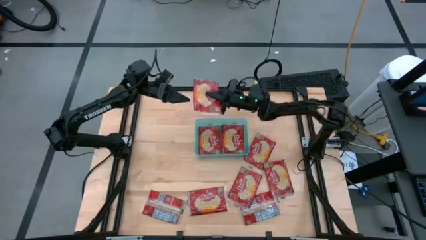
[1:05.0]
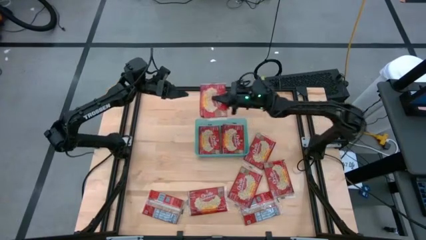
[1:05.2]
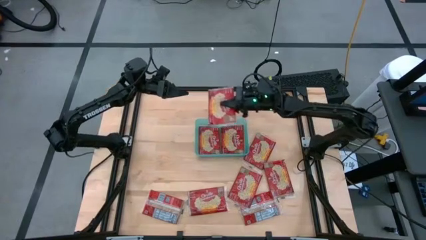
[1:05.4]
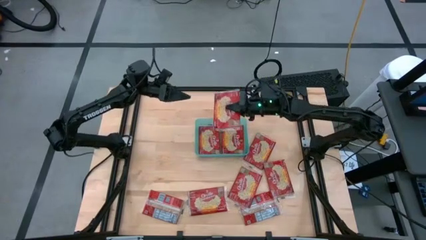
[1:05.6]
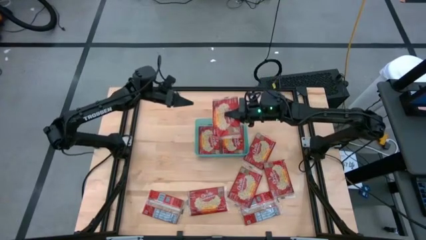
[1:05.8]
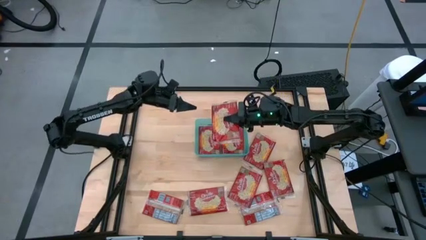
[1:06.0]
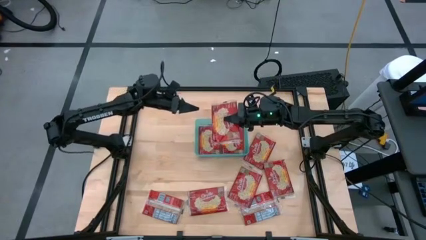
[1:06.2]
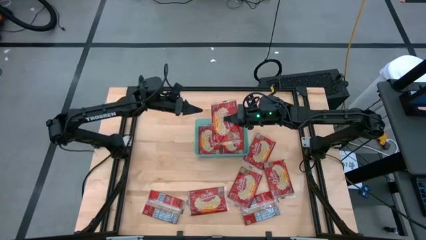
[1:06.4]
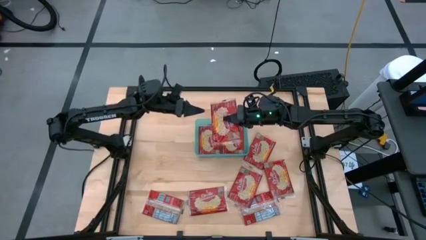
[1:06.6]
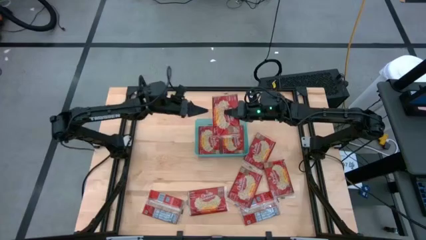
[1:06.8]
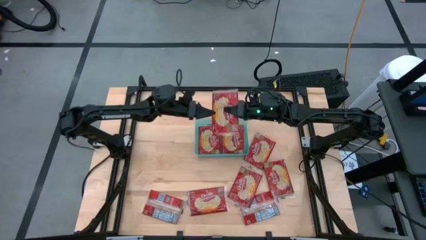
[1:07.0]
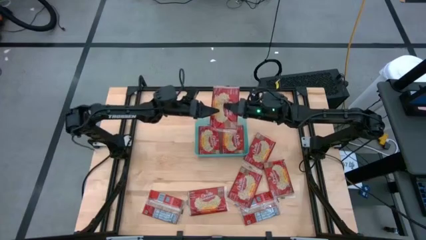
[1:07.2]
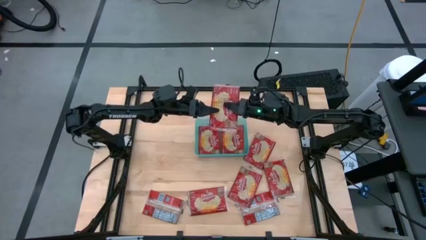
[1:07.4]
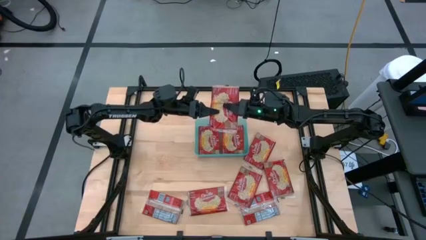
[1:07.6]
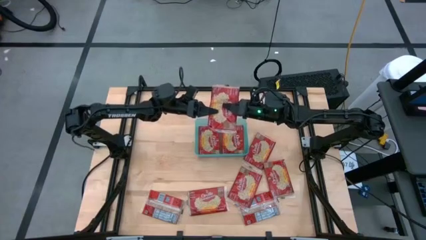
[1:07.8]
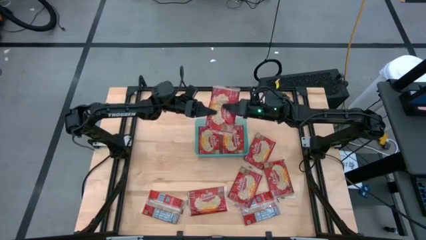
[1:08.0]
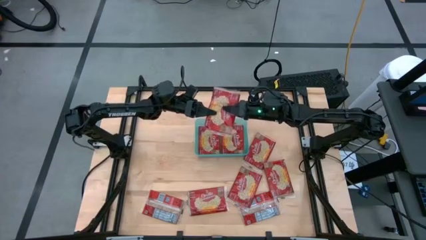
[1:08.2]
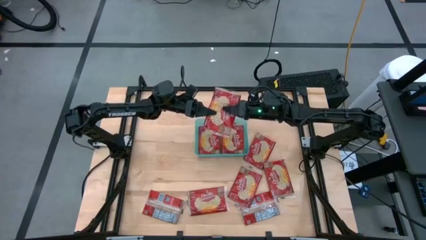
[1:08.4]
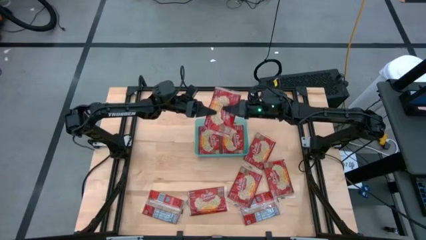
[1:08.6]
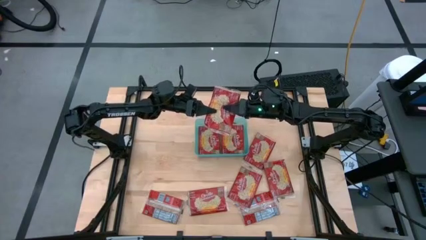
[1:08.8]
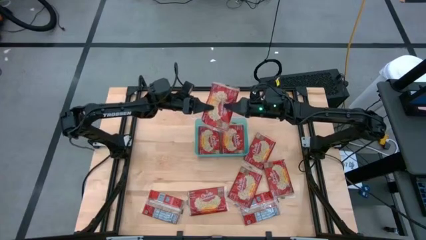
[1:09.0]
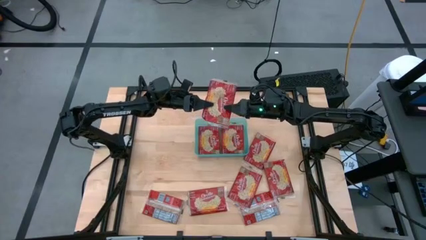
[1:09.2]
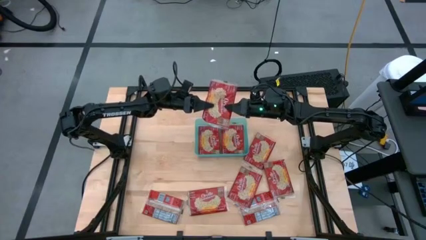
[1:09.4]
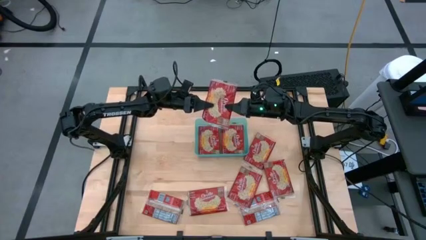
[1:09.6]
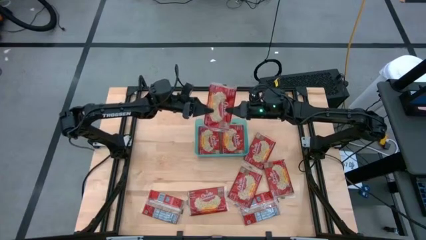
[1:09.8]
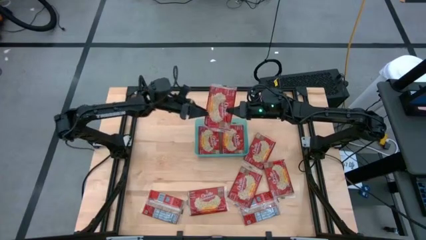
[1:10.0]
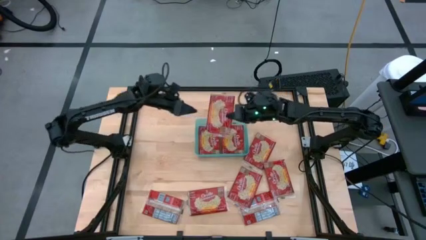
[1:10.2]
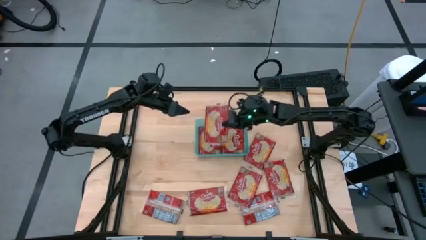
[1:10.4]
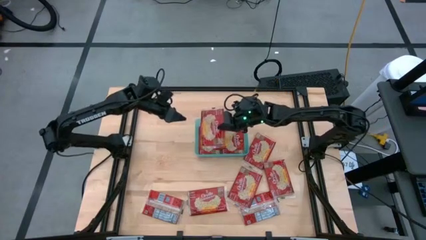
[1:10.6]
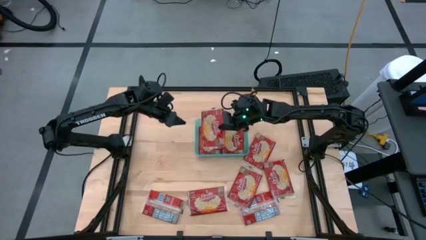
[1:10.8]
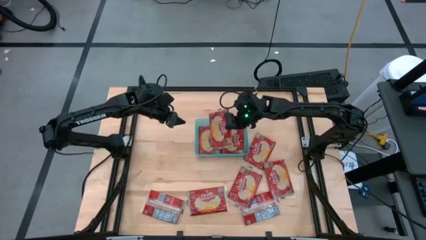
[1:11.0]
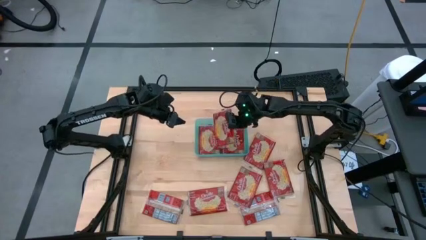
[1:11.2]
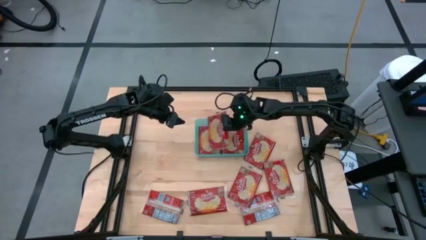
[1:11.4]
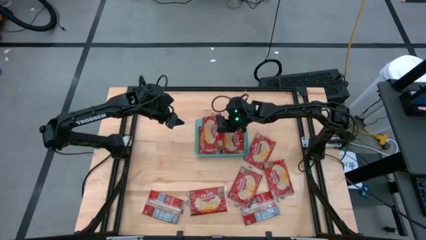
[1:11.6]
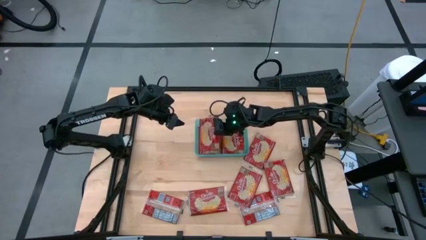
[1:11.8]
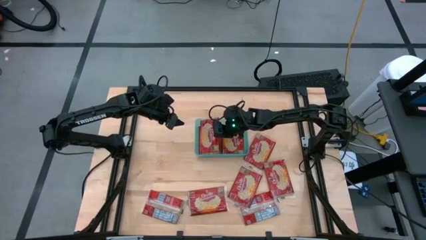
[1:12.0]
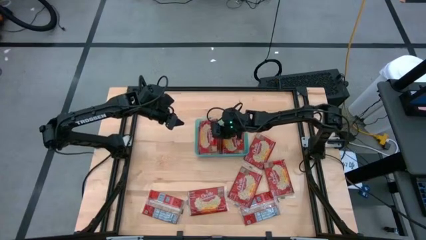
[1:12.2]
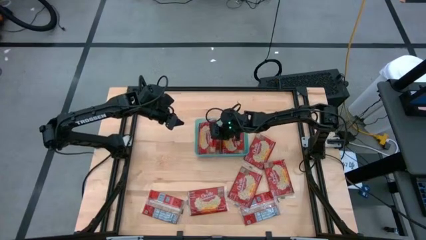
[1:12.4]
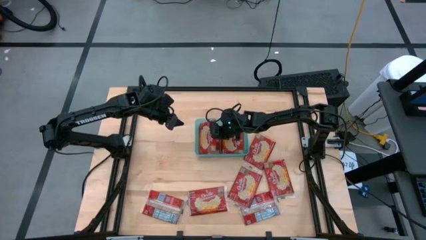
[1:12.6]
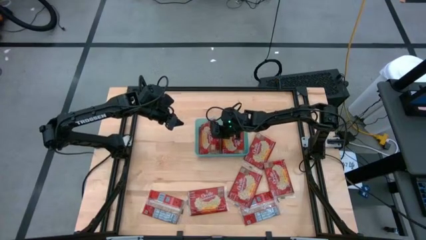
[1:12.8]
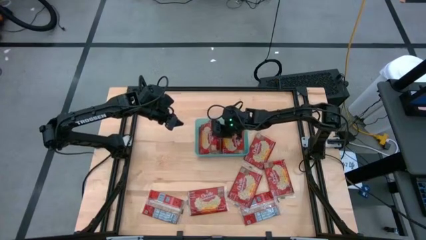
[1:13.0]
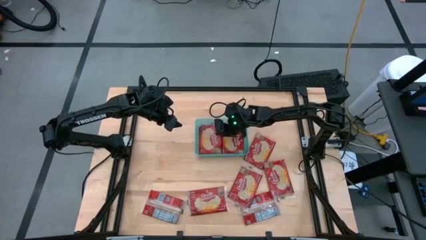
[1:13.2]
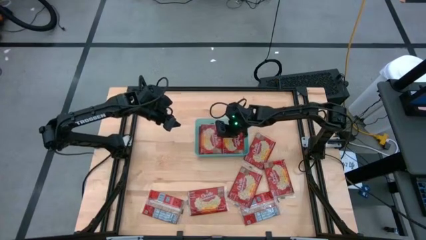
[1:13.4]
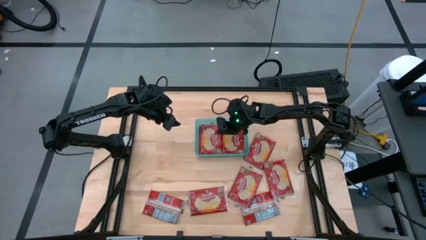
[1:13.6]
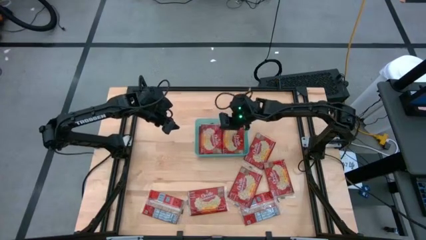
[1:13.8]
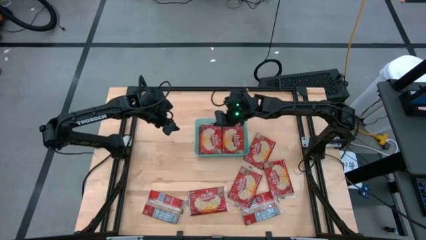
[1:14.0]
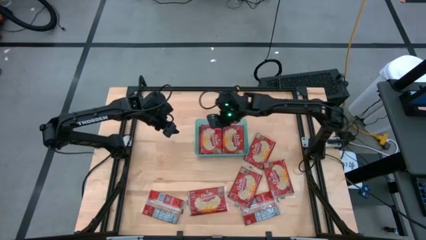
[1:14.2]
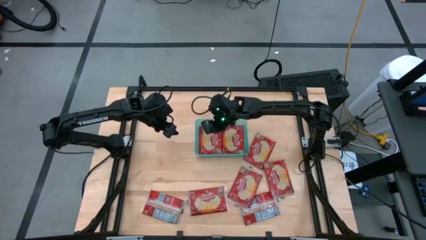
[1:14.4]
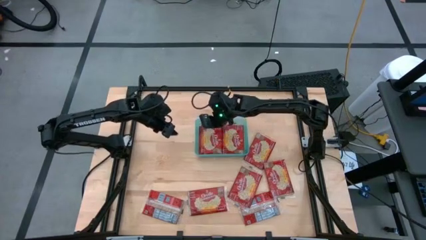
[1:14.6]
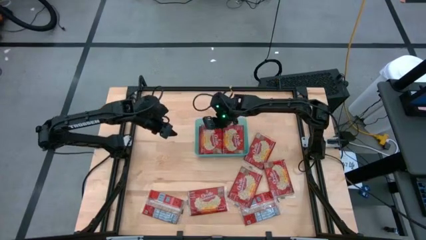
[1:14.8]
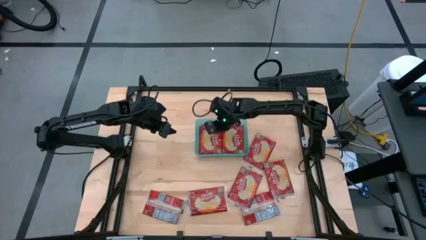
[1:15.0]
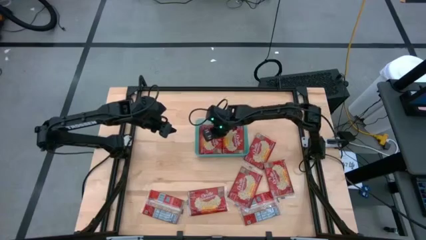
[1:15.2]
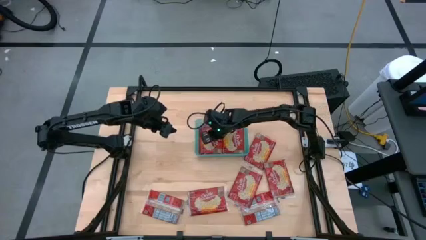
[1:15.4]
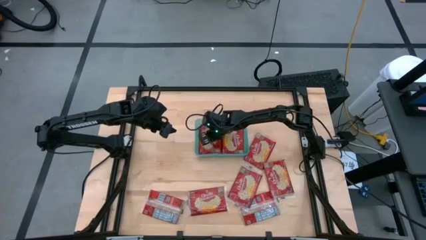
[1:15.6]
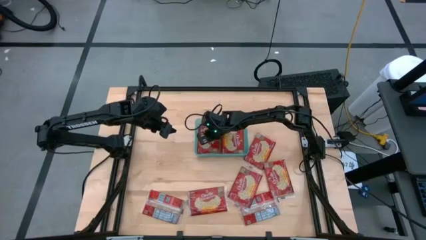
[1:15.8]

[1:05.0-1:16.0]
Task: Sort popcorn bags into baskets
Put the red popcorn bag into the green bin

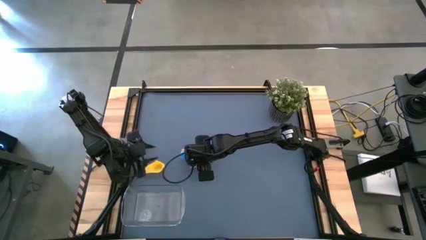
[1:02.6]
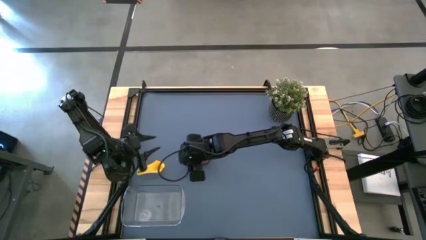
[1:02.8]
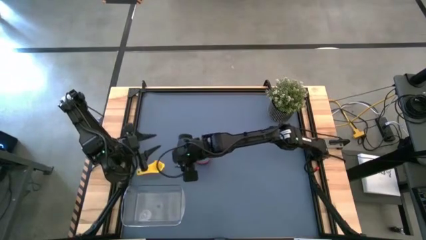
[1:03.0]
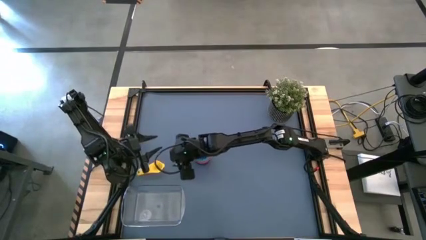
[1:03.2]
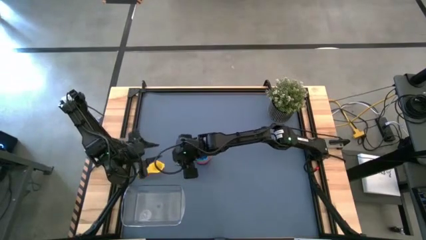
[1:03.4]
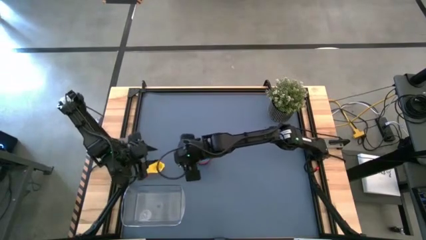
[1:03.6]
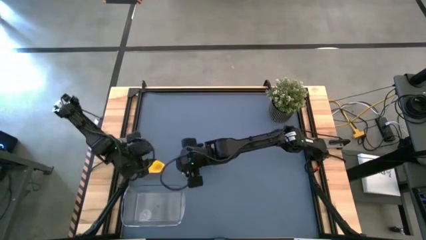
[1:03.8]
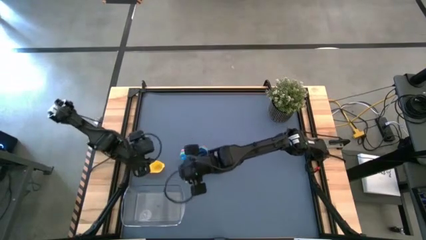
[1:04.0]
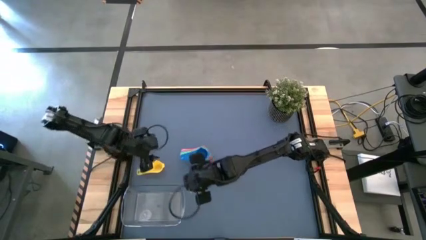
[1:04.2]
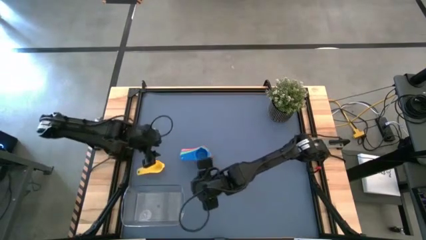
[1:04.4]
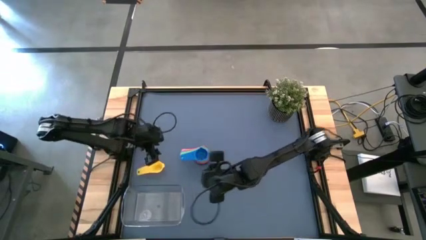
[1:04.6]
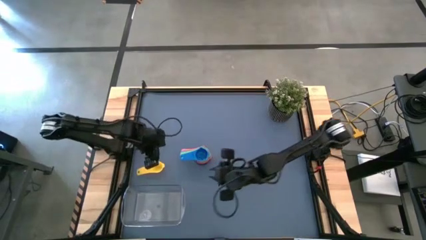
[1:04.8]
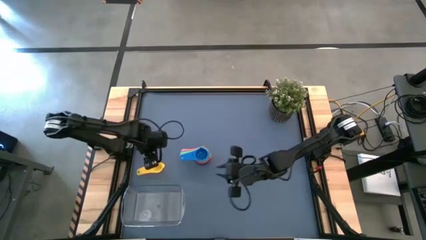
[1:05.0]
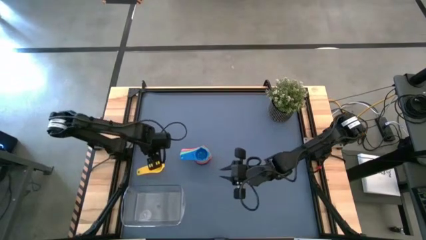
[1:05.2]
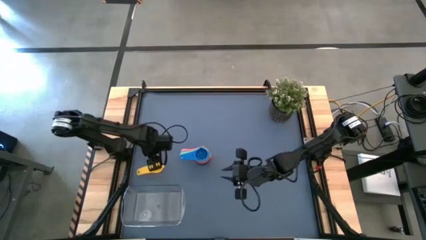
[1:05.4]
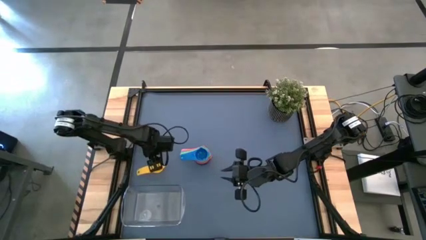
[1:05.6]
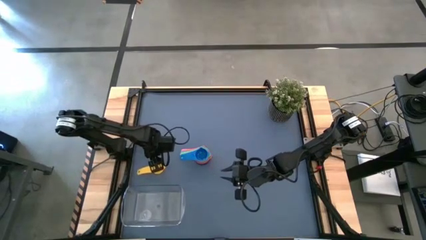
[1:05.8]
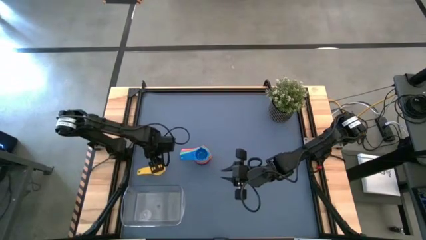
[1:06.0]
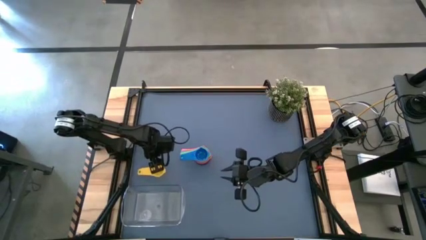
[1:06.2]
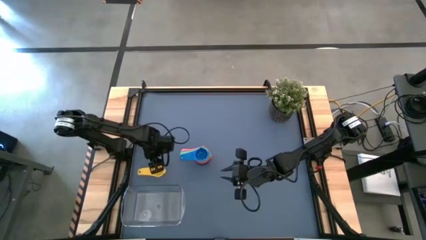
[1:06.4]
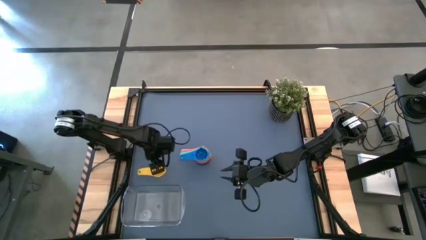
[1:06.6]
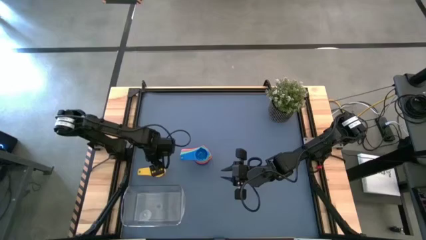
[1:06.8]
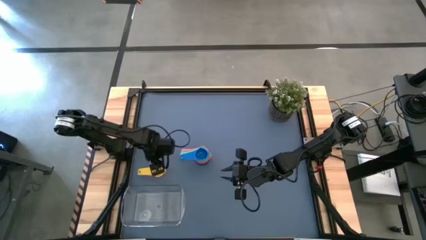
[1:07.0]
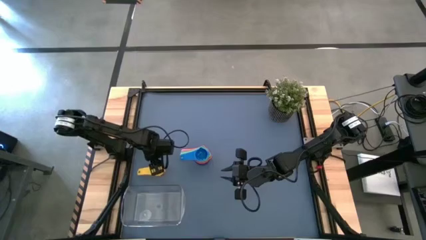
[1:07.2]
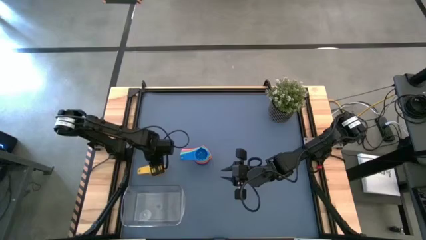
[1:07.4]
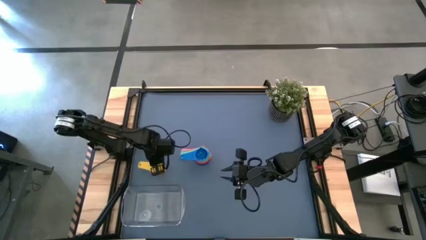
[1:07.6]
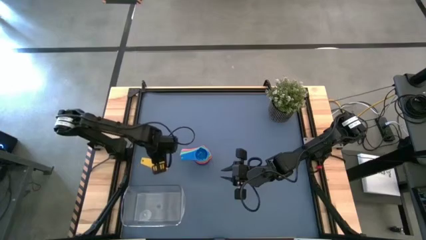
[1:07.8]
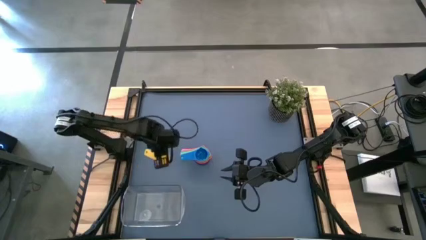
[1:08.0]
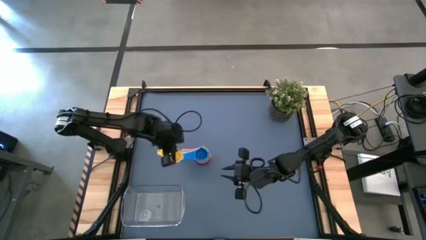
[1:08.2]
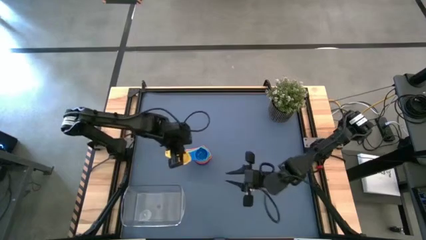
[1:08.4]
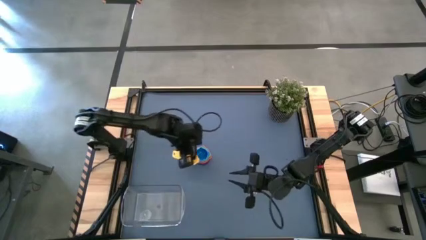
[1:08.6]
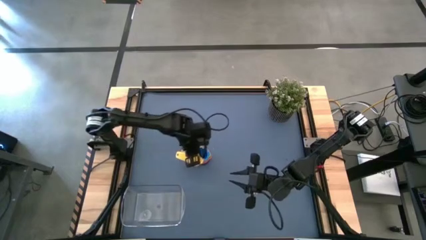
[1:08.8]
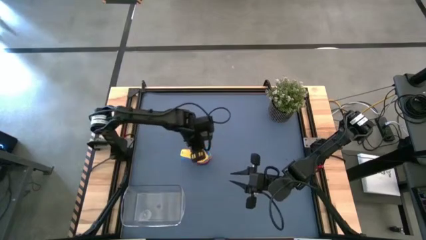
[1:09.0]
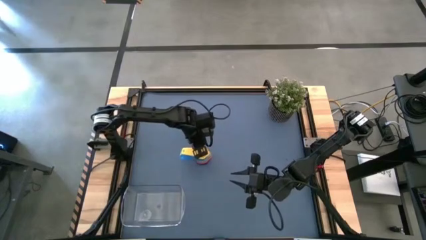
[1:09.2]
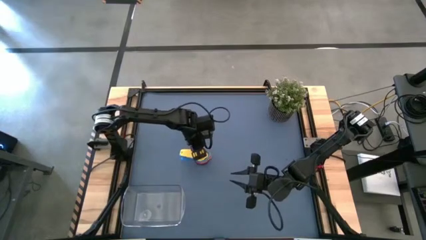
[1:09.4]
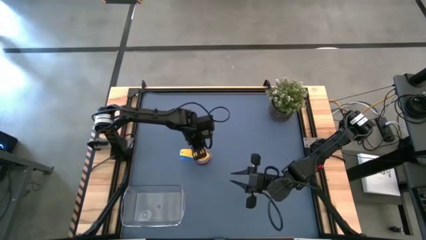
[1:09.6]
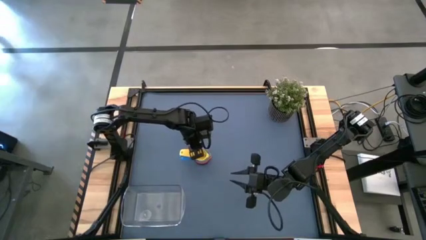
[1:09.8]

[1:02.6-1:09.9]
Task: Nest measuring cups in basket
Stack the yellow measuring cup on top of the blue measuring cup
